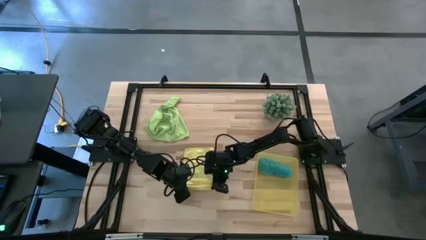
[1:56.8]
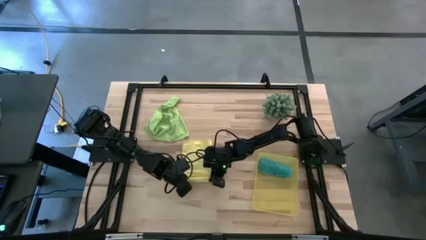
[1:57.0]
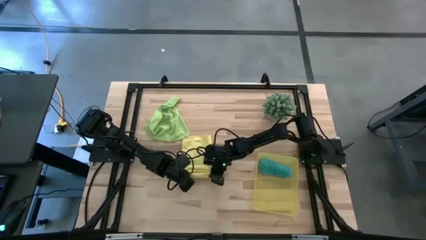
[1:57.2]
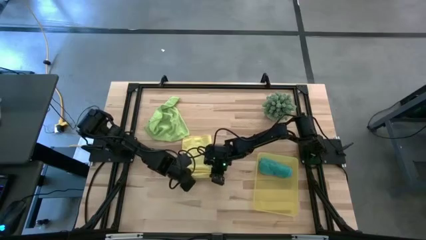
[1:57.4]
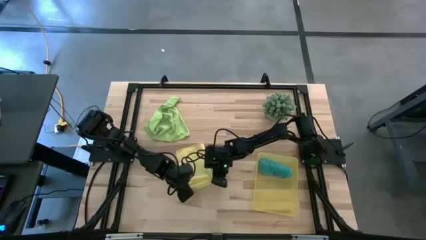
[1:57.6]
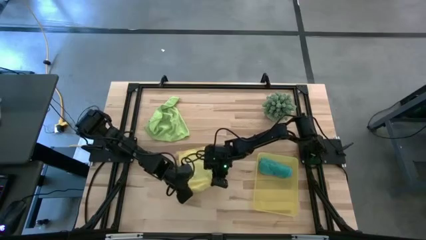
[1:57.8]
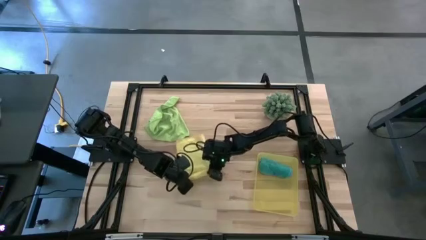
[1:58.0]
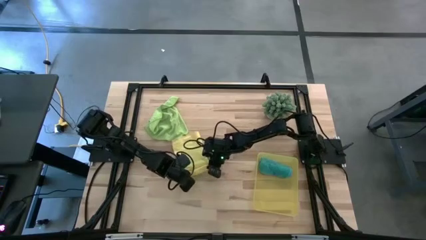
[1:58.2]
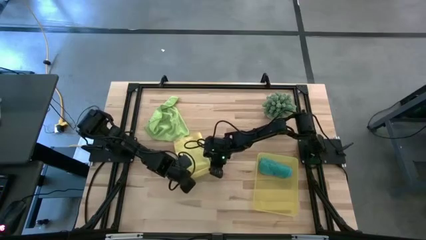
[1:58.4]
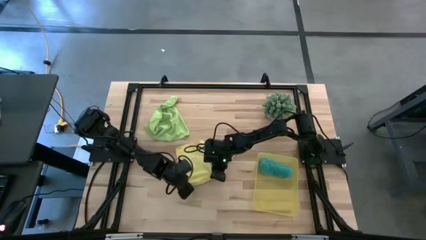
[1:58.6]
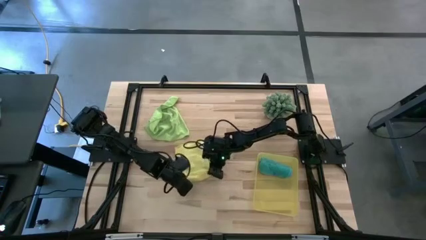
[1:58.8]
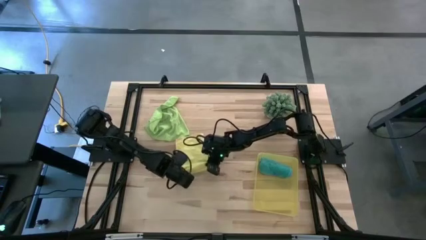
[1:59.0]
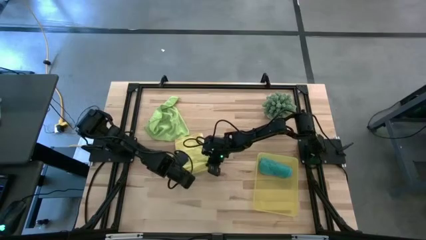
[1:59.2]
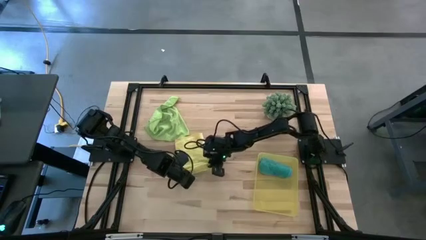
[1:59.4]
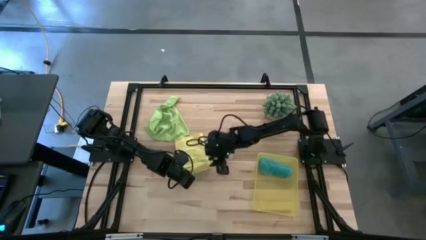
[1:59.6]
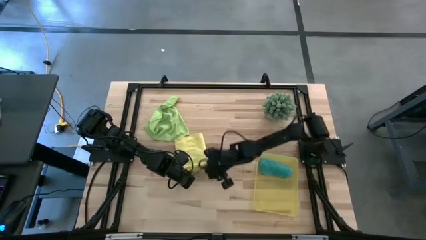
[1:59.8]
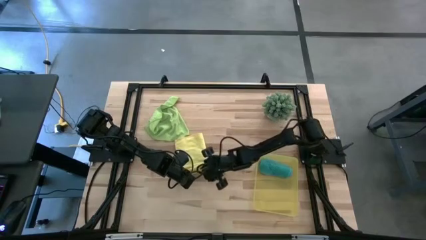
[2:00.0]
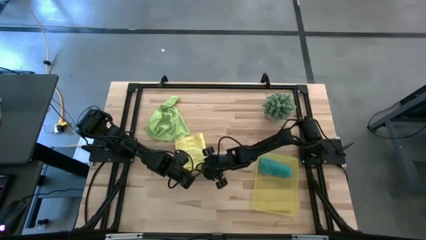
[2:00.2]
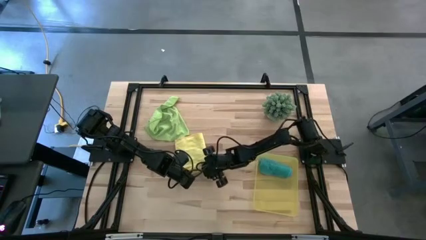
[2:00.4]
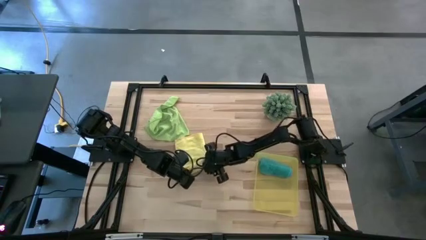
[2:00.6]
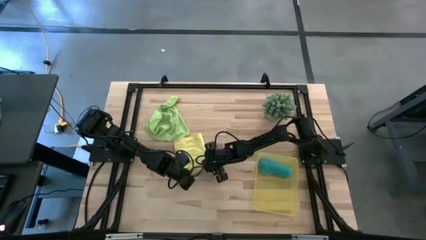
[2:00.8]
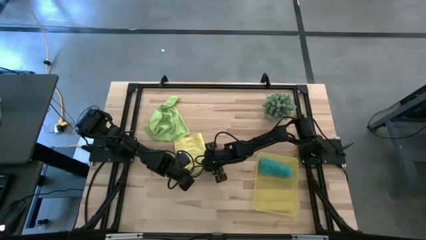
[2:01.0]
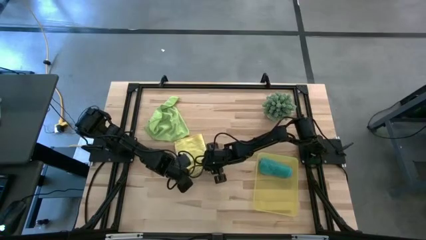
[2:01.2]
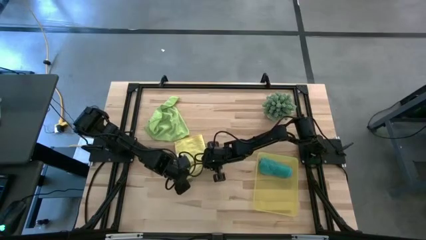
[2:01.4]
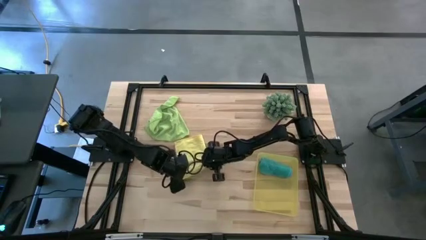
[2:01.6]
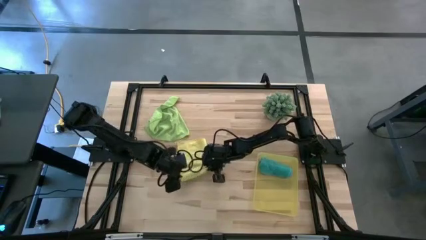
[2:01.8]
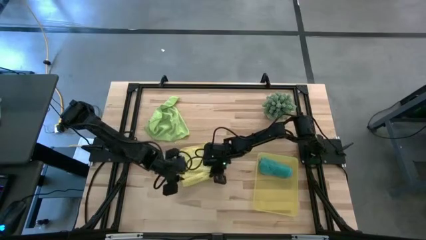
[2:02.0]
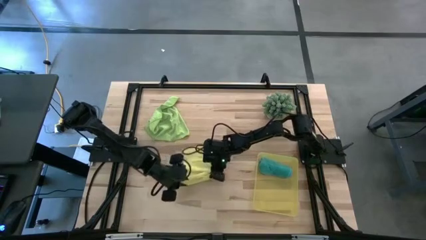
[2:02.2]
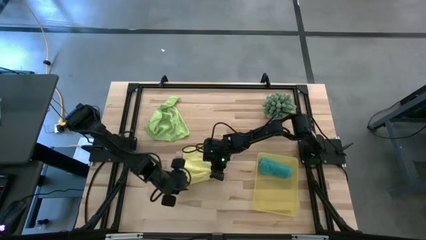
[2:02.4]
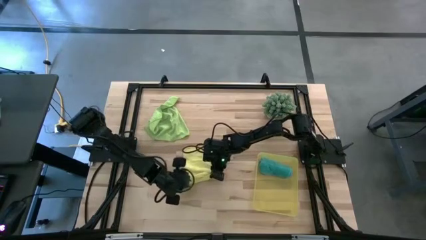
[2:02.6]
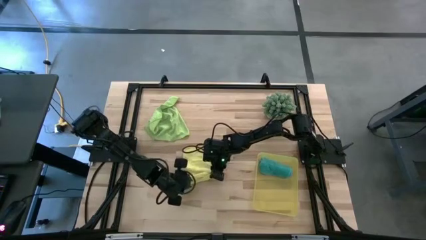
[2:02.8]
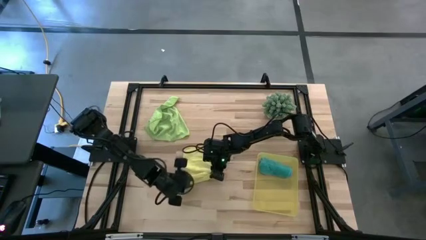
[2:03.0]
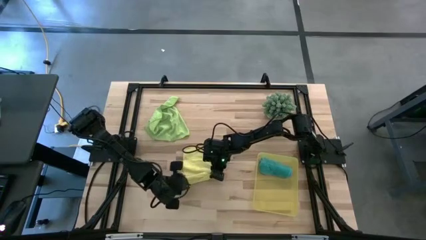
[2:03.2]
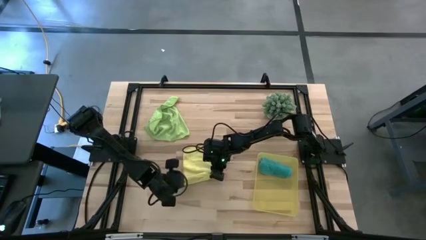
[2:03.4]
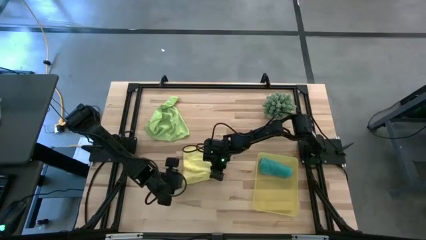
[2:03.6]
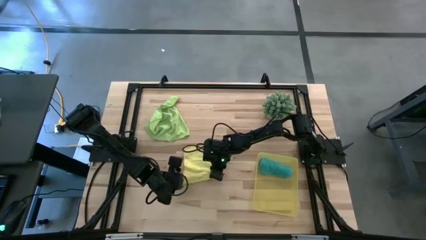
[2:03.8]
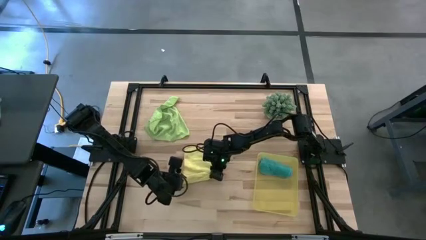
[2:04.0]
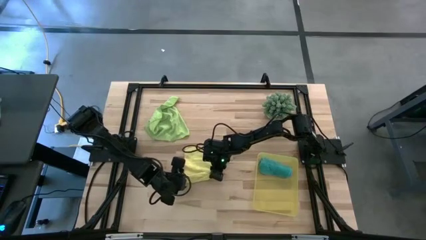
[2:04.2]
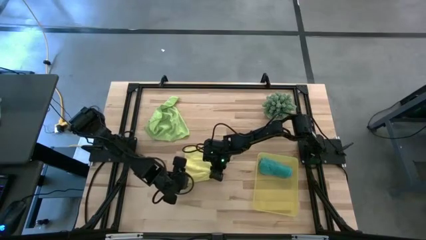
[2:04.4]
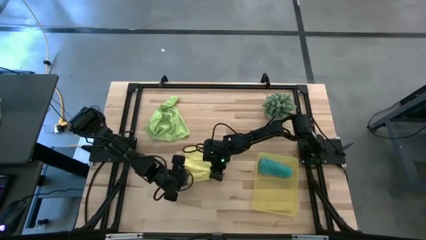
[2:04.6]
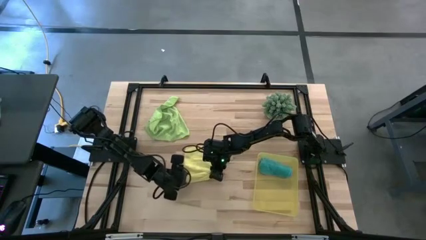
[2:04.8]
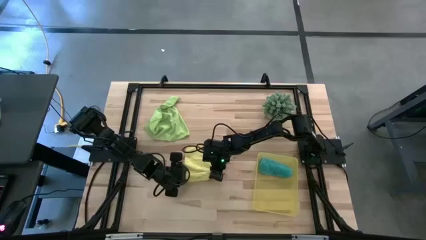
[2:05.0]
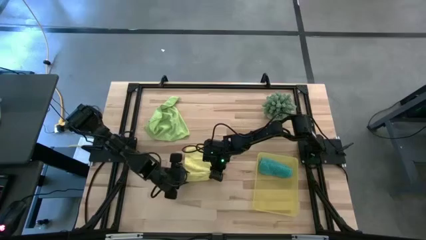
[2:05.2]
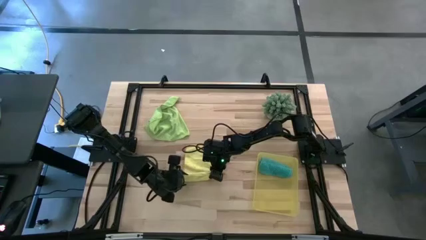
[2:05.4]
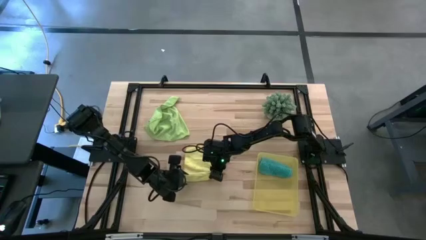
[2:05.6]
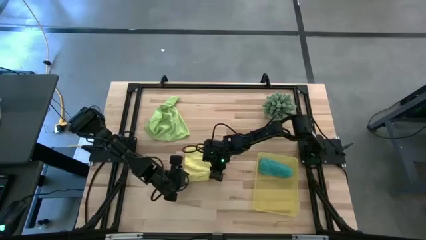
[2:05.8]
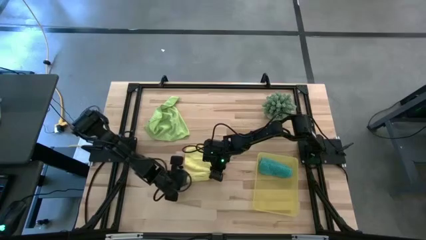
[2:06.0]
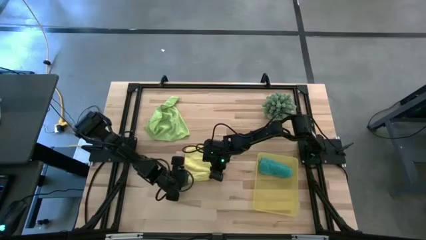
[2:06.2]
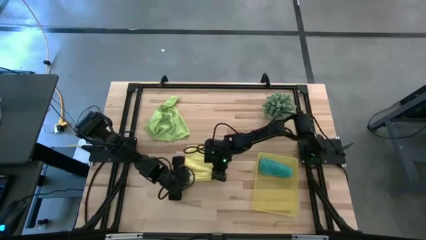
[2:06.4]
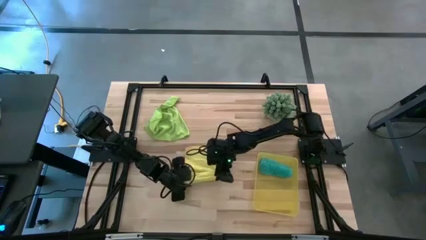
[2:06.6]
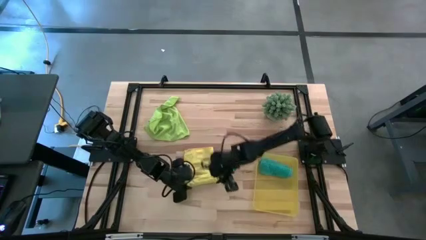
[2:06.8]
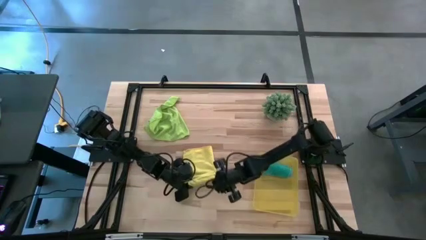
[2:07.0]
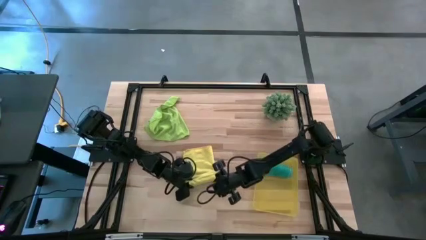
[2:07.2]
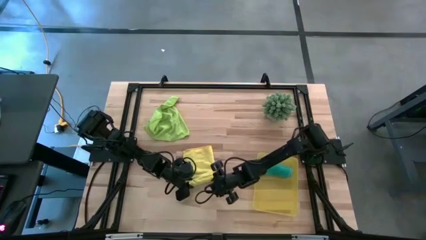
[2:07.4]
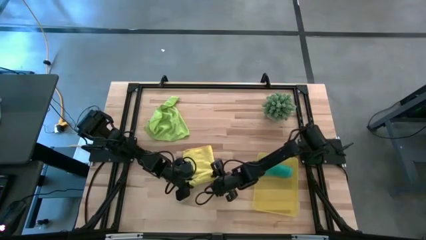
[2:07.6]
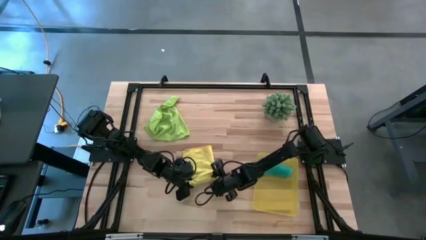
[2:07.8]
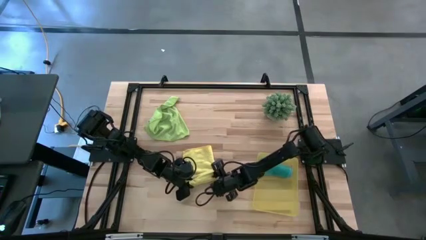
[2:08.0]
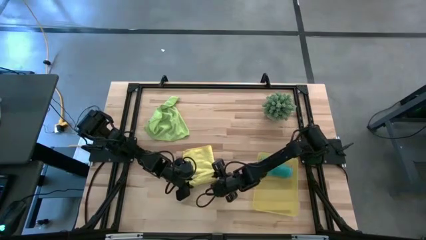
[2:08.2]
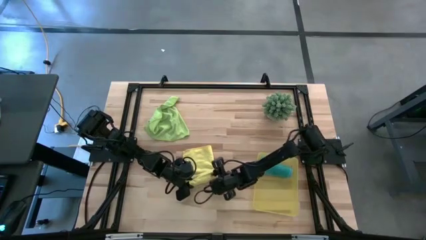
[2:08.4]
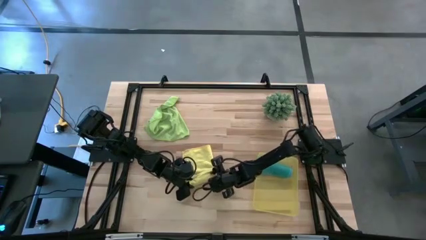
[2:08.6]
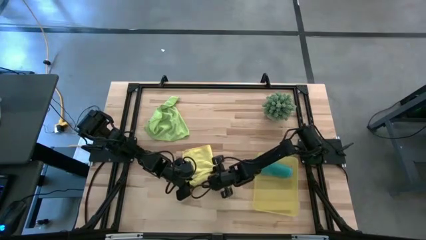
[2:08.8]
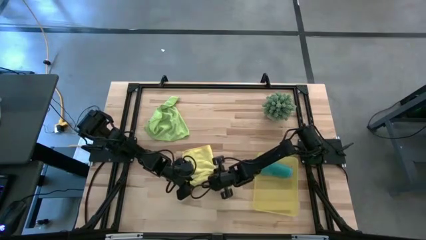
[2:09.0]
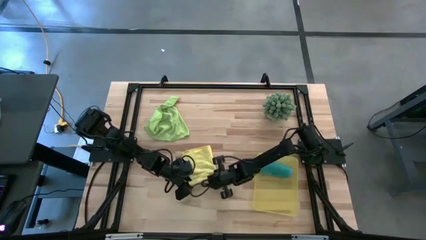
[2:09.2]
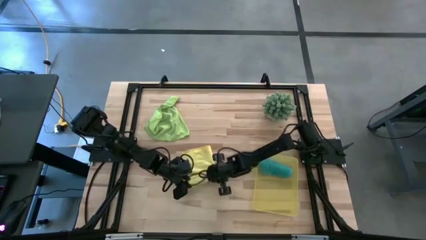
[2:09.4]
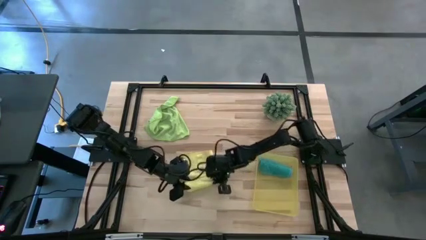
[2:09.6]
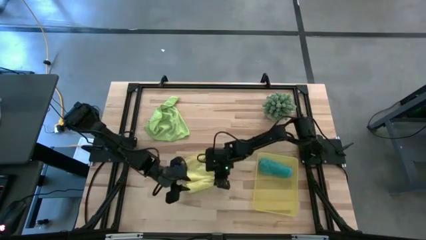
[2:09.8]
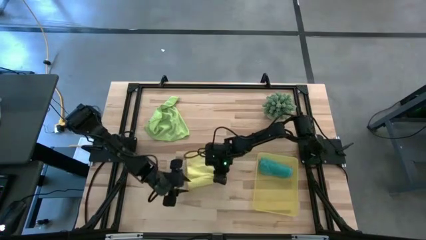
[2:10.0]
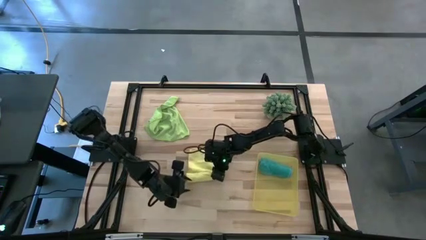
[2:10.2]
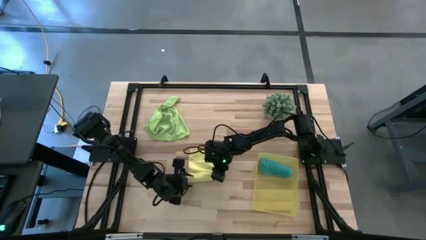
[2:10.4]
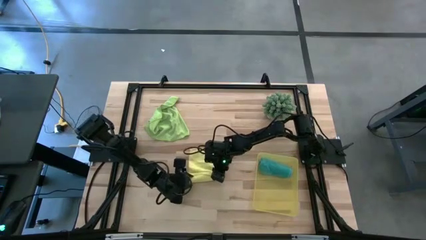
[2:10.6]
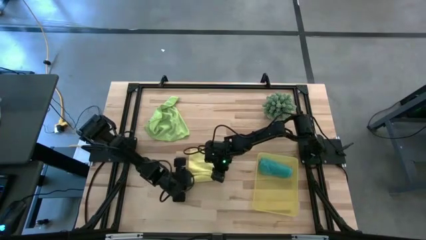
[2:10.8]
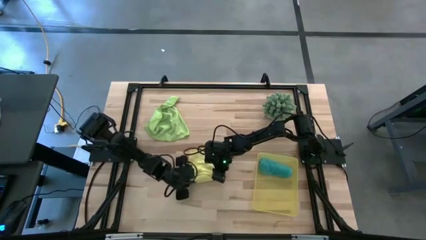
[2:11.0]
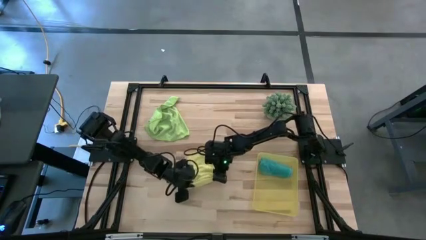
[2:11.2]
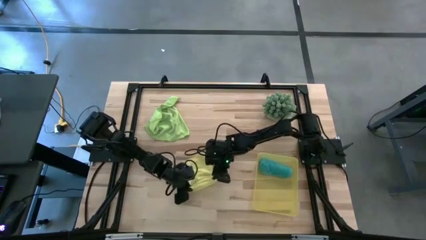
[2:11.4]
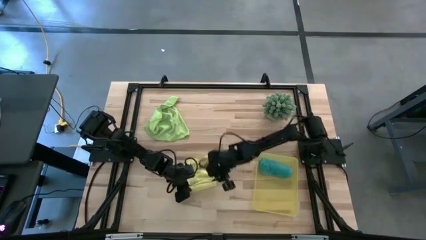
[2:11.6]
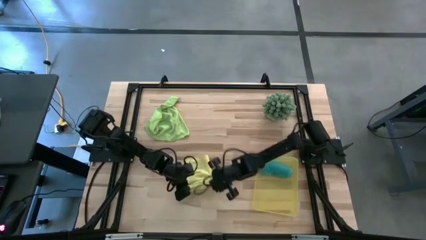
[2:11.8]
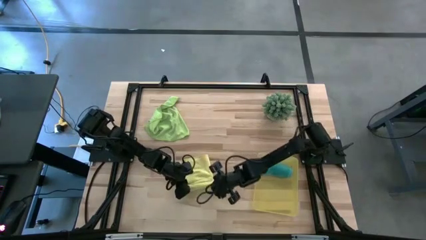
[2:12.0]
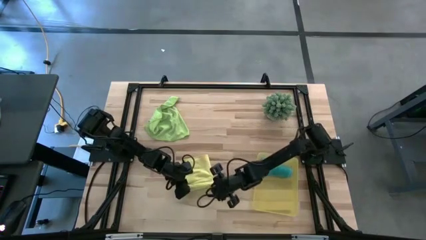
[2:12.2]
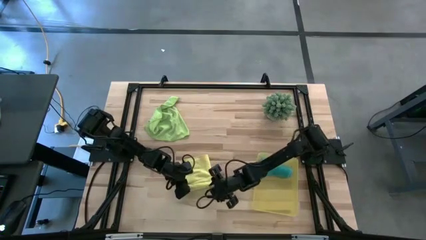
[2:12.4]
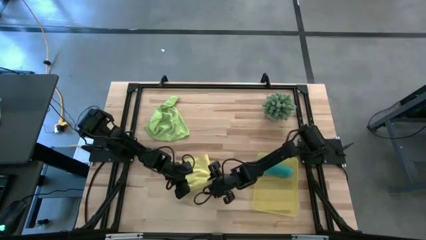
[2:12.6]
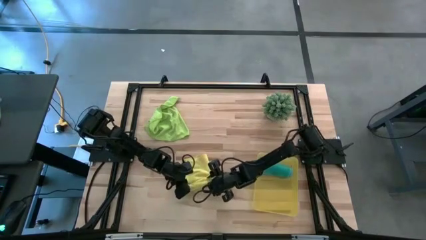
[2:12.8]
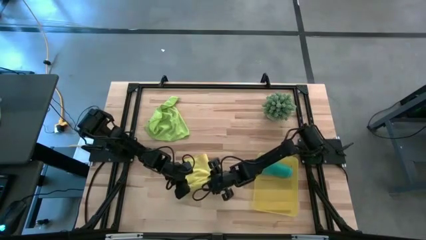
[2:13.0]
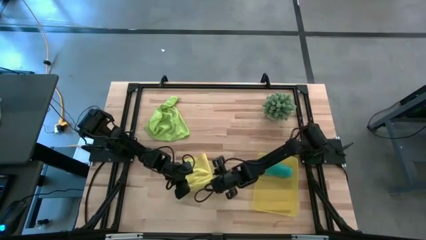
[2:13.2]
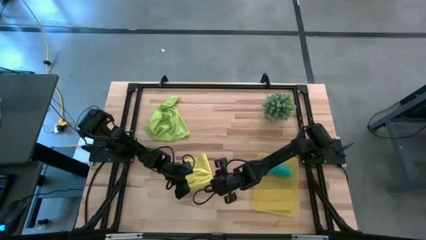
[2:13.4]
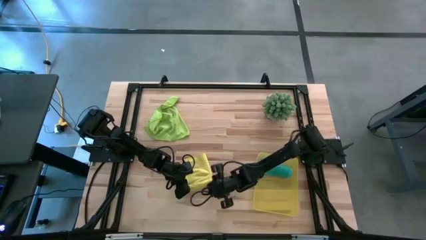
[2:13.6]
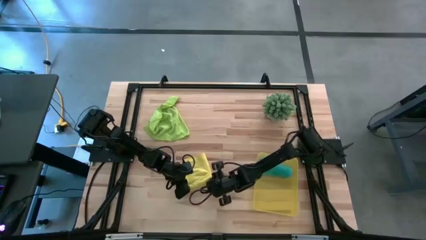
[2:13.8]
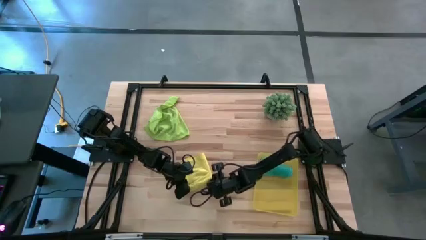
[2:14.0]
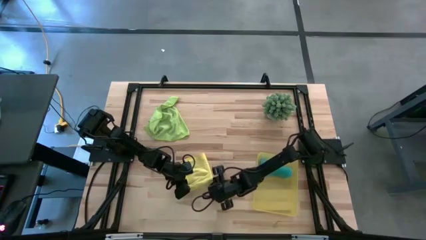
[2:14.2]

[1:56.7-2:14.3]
Task: Roll microfiber towels into tight, uniform cylinder then place into a basket
Roll the yellow microfiber cloth
